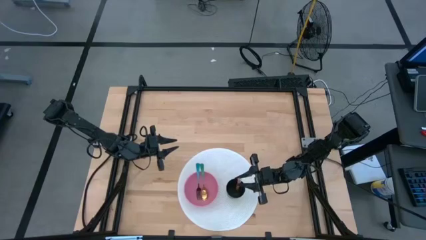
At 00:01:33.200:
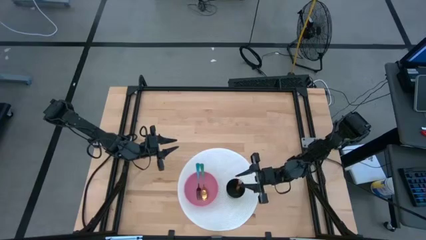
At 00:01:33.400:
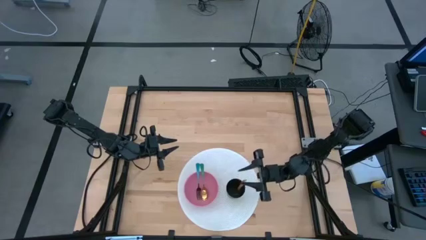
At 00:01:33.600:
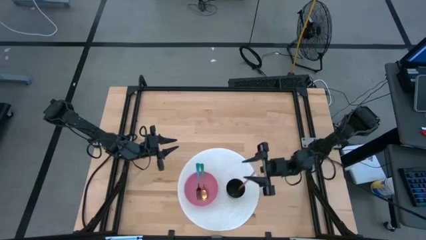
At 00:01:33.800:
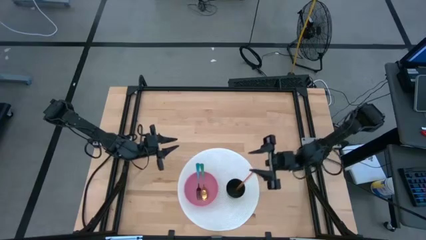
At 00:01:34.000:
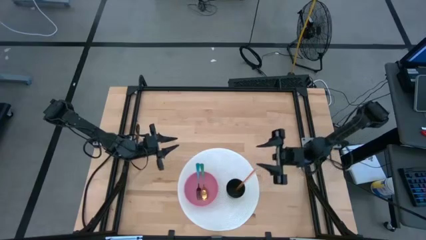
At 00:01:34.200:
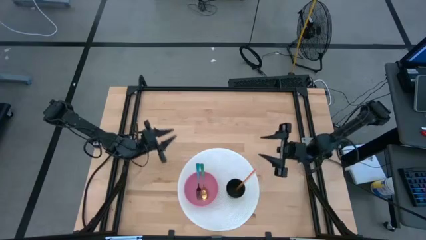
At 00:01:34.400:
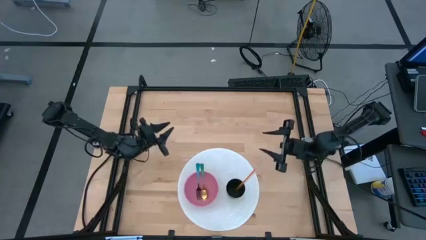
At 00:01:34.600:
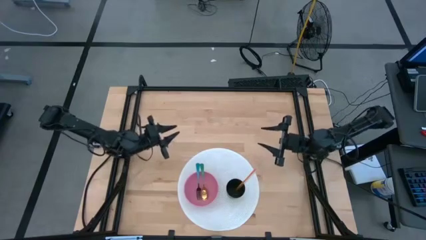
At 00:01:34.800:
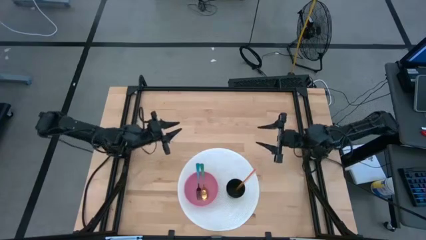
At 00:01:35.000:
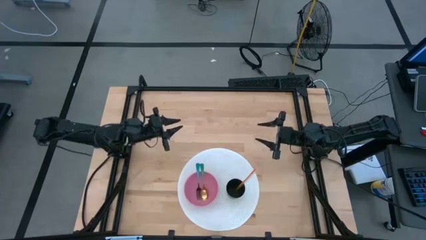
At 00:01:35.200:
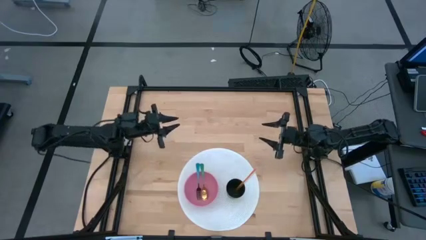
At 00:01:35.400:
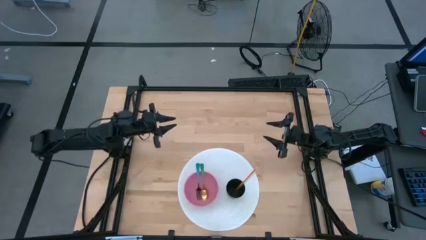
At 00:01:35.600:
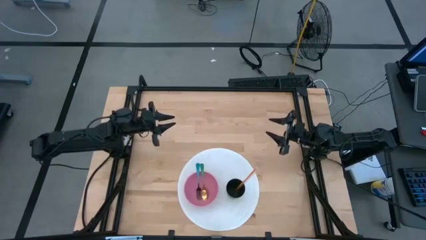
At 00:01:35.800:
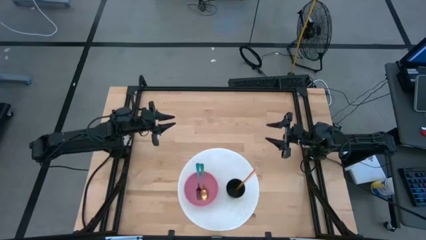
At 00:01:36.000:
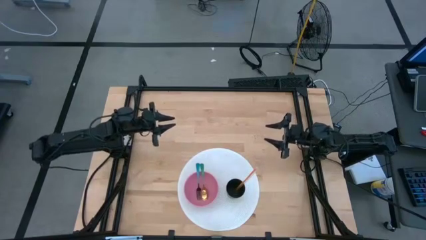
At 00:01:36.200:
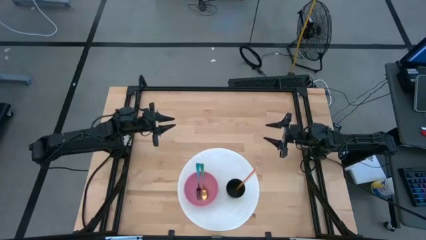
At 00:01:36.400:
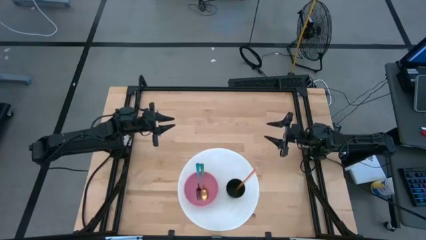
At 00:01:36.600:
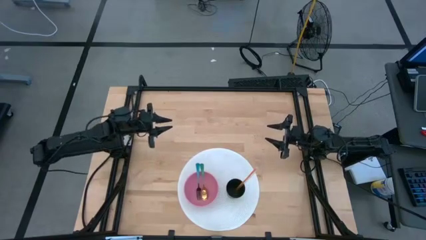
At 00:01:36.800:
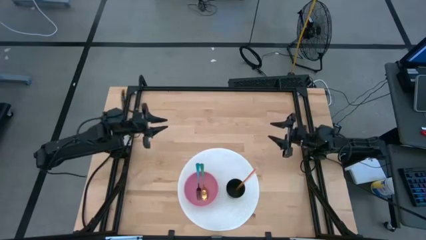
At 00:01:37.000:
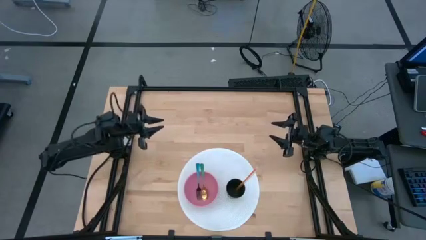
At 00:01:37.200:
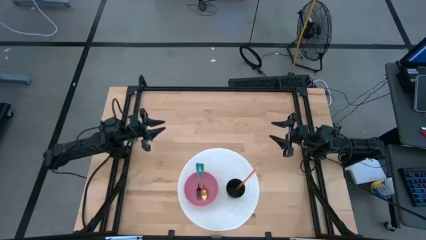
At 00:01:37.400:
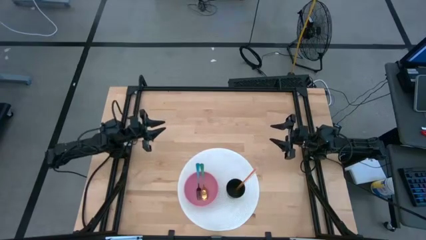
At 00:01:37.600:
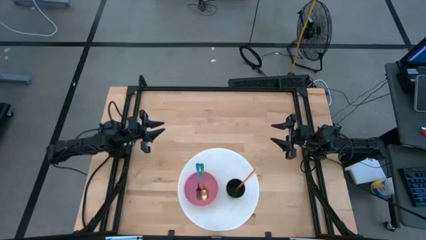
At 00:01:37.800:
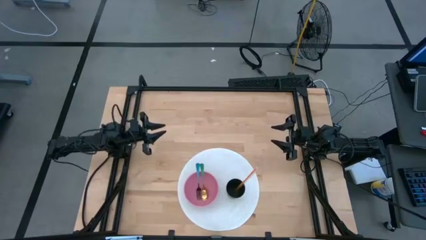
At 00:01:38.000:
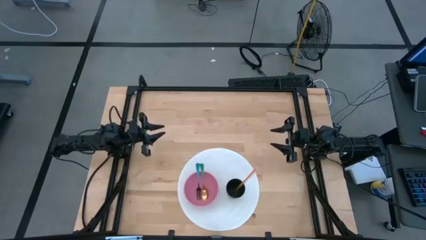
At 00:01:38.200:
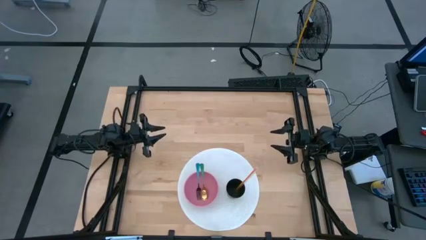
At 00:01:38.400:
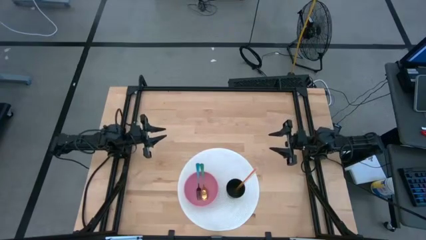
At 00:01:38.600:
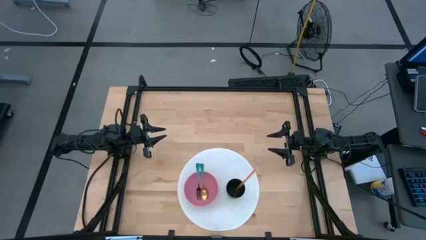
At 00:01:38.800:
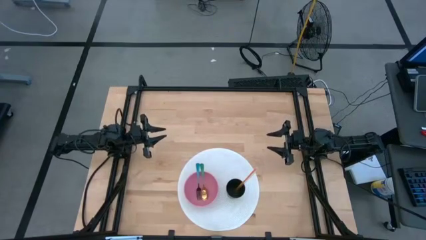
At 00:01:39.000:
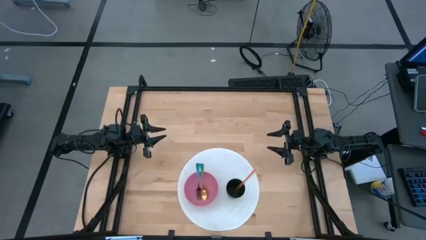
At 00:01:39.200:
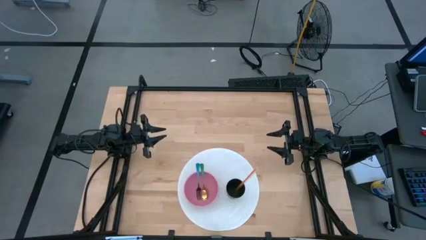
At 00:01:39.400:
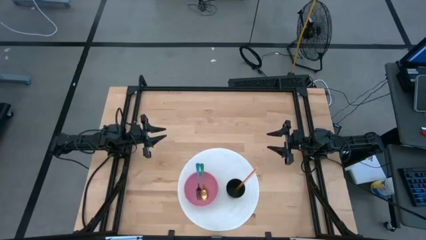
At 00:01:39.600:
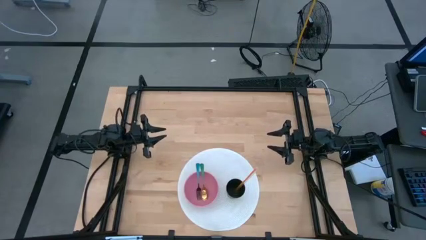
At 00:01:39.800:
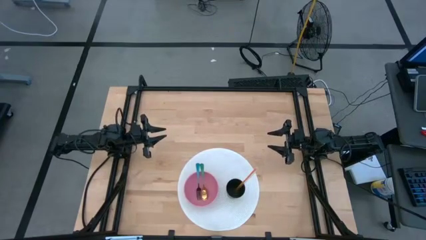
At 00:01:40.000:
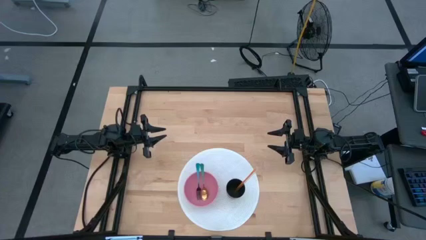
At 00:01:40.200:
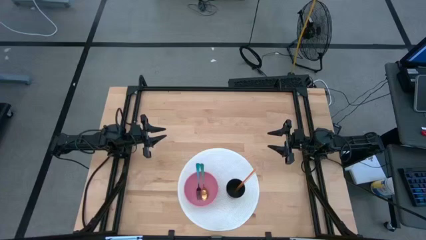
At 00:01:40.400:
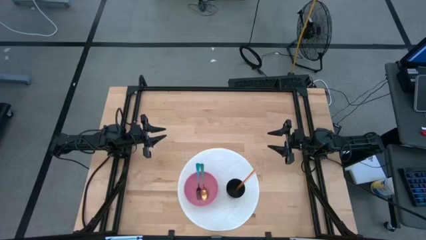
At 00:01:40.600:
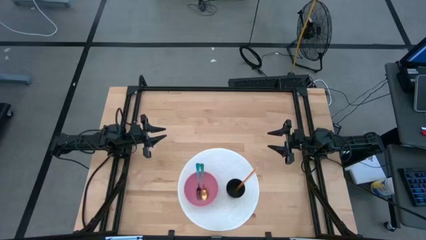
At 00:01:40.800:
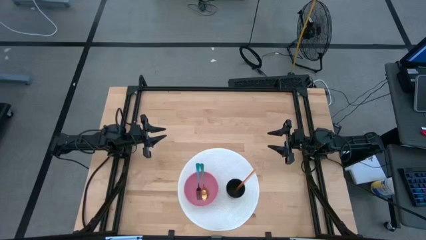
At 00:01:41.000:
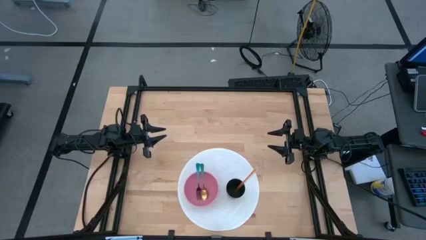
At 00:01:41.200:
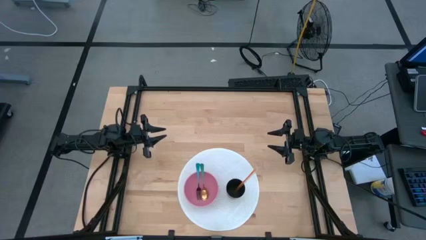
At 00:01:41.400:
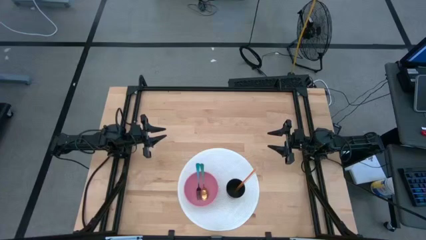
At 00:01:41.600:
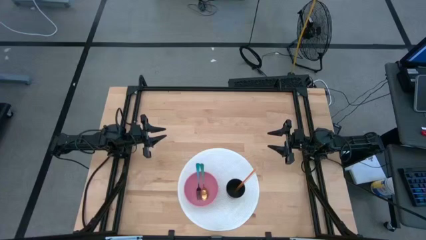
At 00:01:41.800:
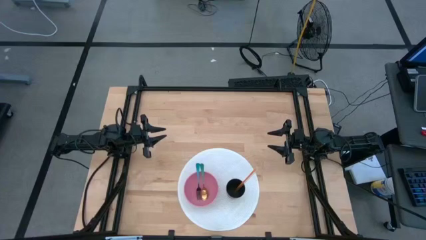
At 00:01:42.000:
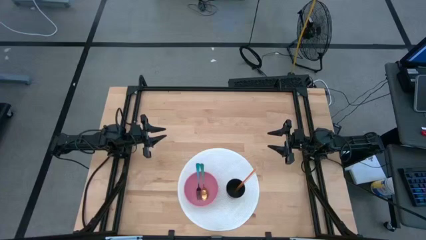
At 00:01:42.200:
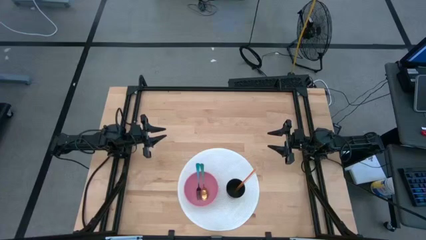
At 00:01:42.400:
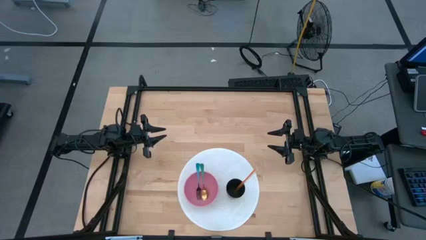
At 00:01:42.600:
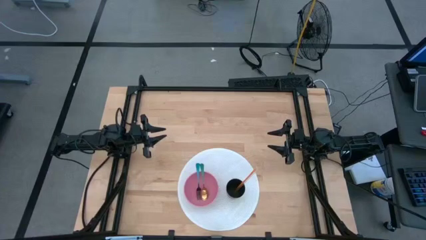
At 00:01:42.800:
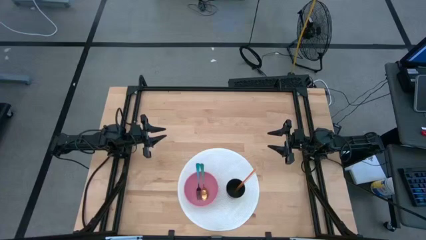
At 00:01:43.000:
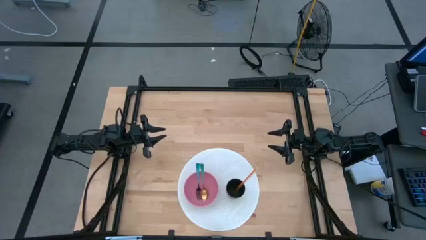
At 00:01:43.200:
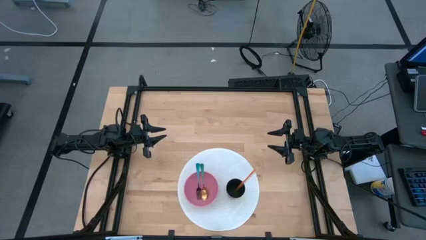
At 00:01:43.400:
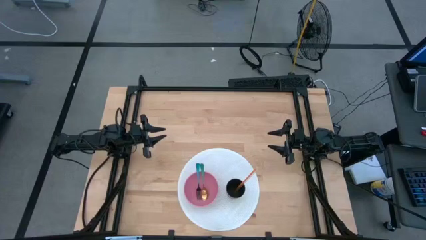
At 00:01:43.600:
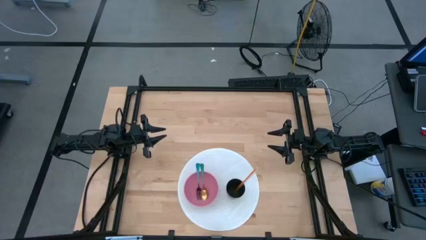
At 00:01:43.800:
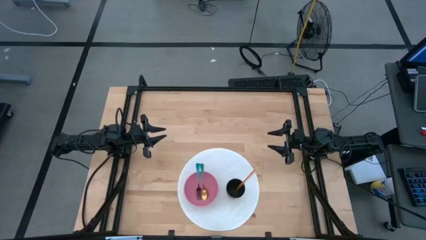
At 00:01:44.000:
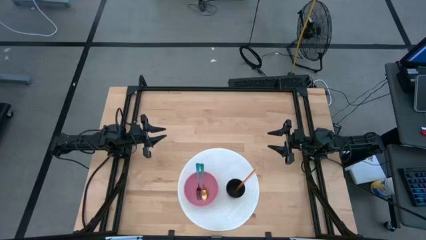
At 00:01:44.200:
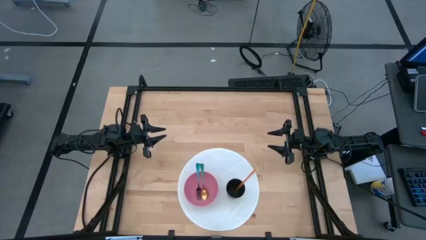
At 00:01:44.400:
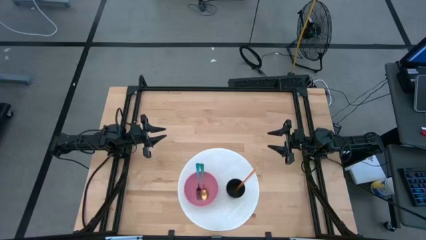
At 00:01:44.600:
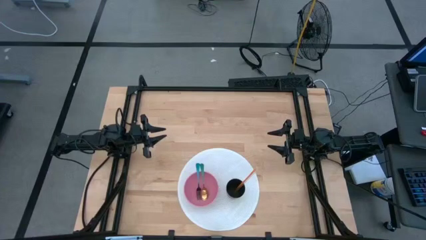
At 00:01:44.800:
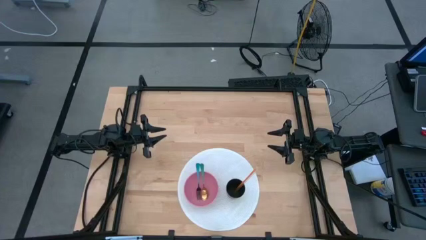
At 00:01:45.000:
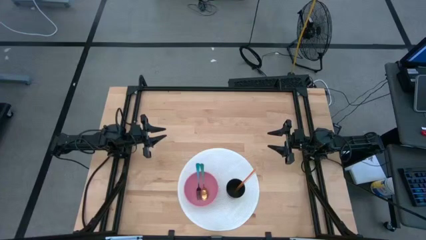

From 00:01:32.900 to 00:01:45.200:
Task: Pick & Place Utensil
Return to Home Position
